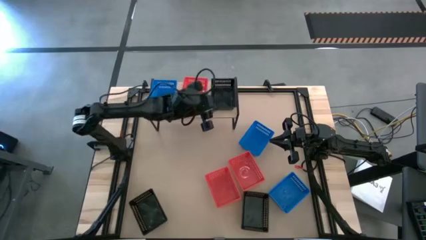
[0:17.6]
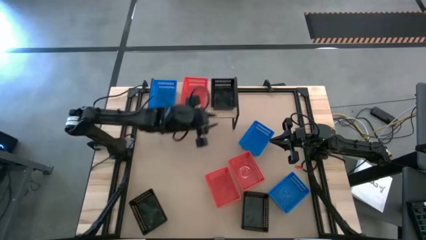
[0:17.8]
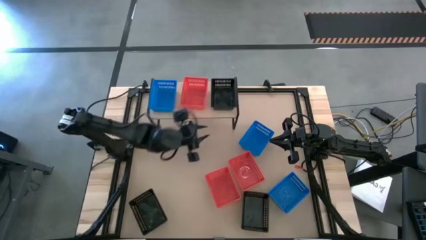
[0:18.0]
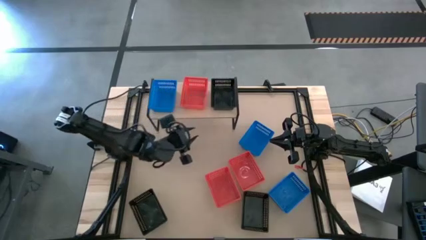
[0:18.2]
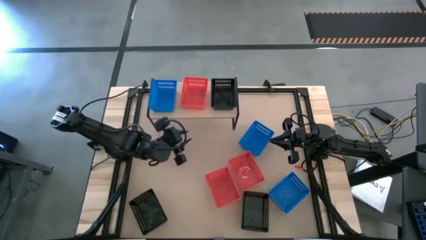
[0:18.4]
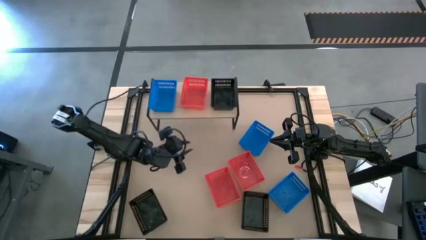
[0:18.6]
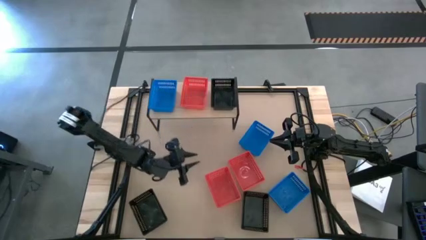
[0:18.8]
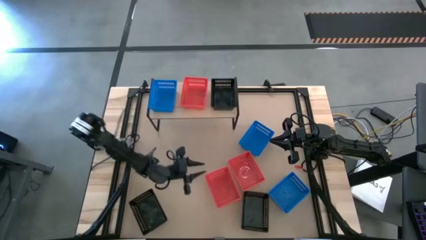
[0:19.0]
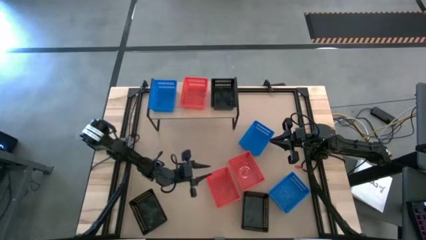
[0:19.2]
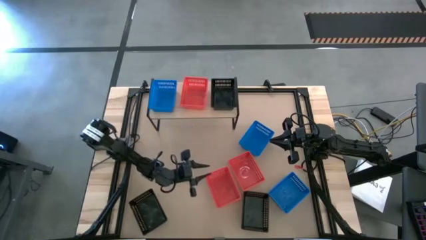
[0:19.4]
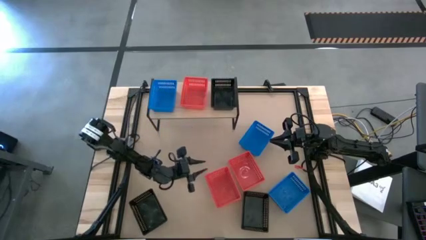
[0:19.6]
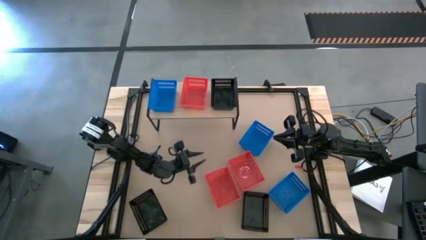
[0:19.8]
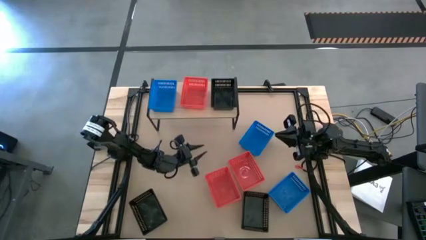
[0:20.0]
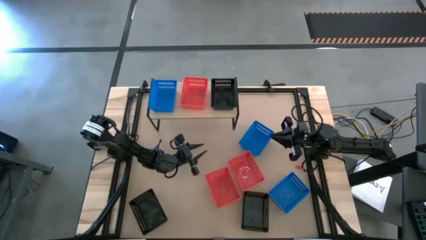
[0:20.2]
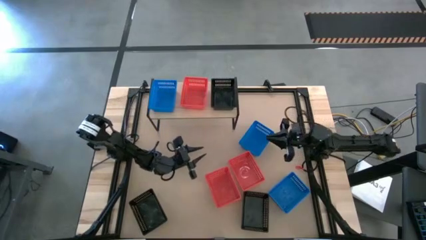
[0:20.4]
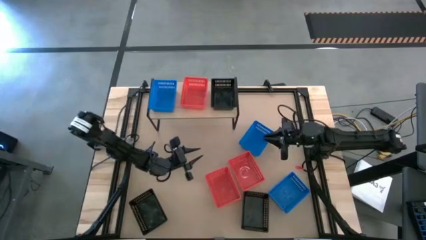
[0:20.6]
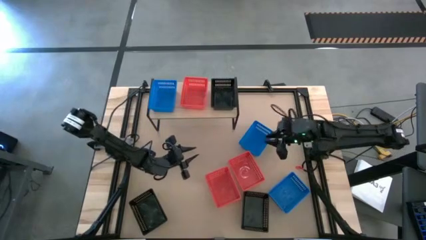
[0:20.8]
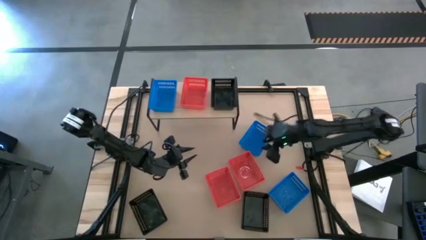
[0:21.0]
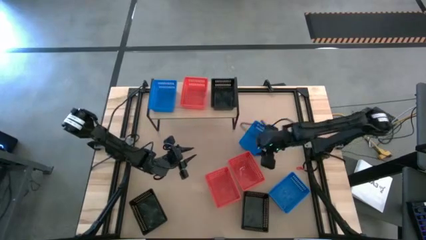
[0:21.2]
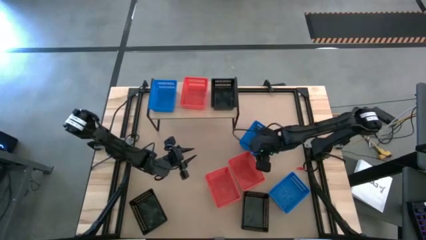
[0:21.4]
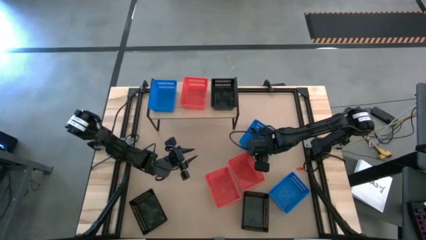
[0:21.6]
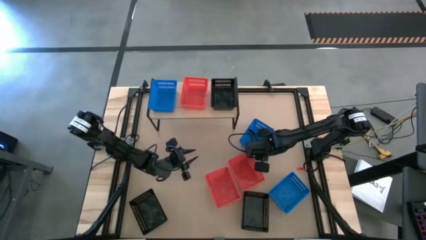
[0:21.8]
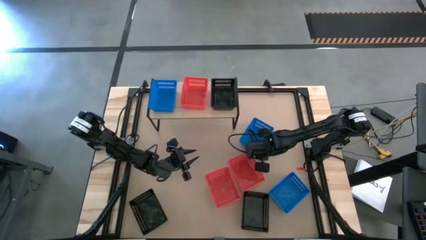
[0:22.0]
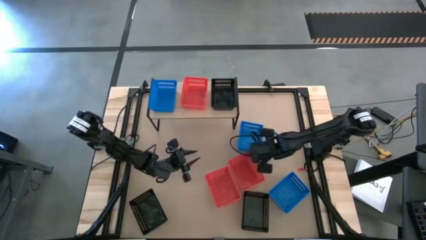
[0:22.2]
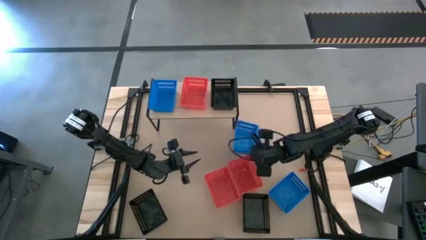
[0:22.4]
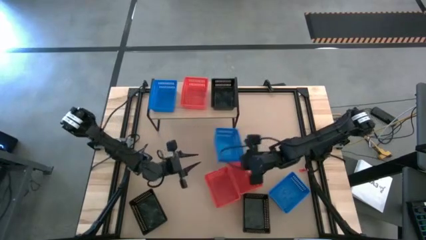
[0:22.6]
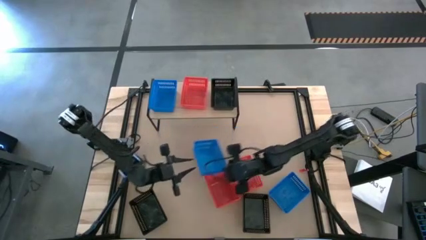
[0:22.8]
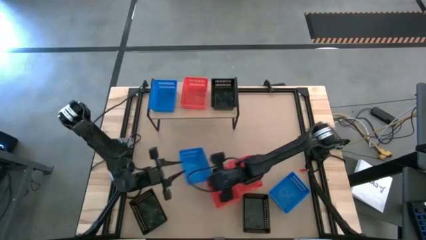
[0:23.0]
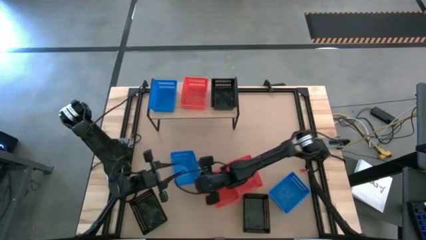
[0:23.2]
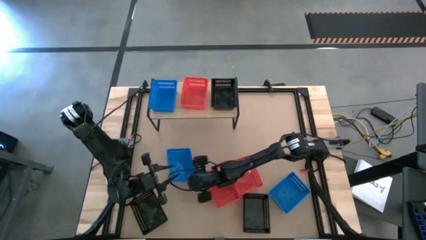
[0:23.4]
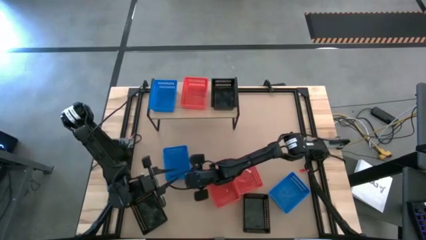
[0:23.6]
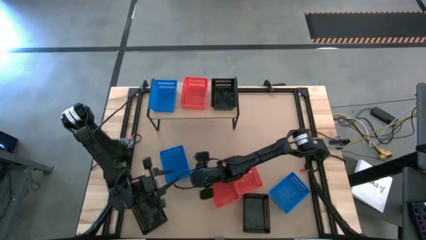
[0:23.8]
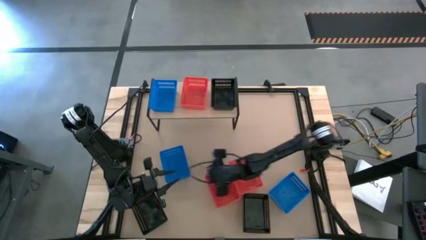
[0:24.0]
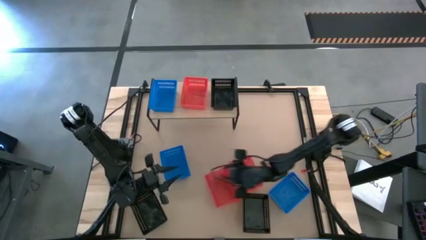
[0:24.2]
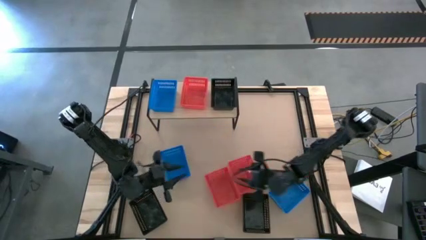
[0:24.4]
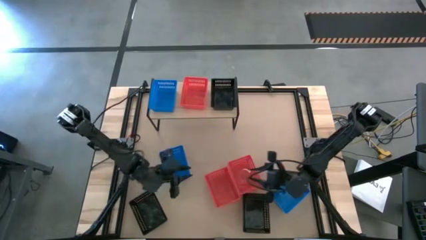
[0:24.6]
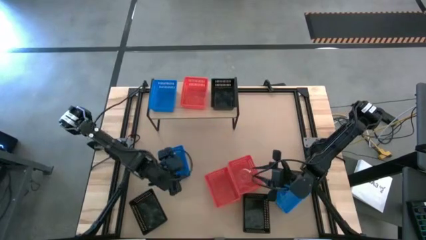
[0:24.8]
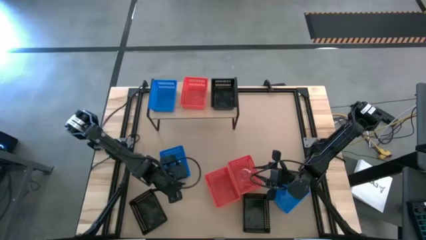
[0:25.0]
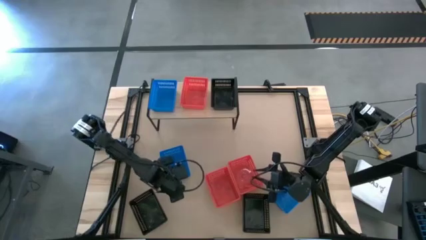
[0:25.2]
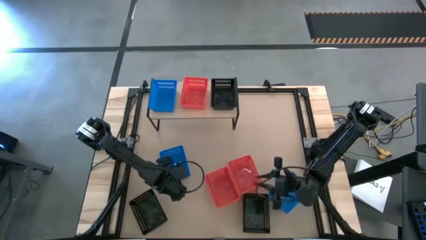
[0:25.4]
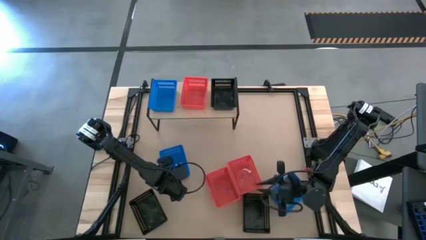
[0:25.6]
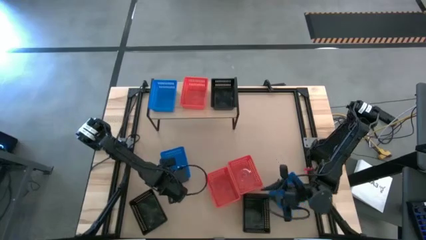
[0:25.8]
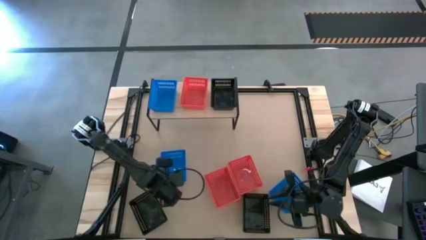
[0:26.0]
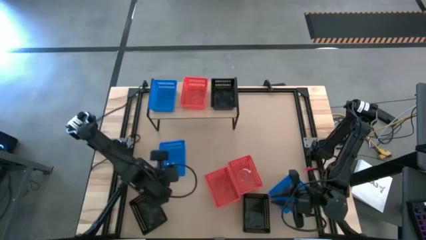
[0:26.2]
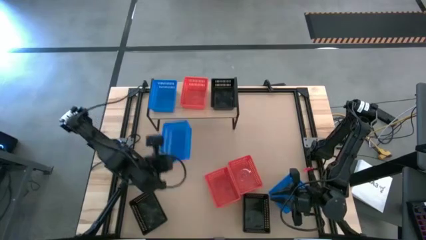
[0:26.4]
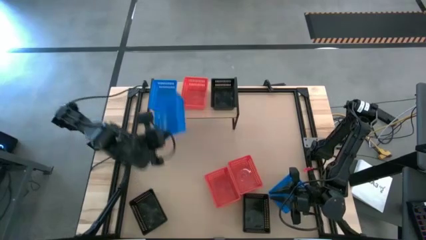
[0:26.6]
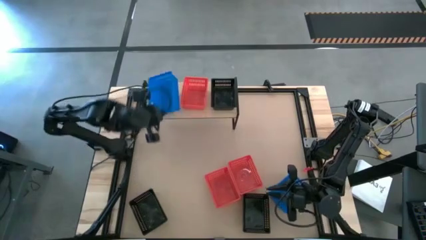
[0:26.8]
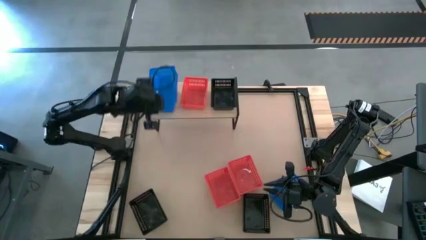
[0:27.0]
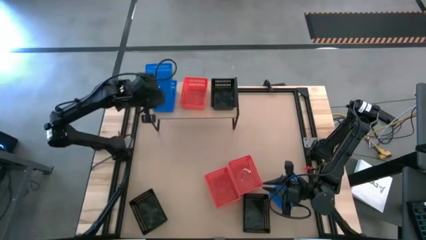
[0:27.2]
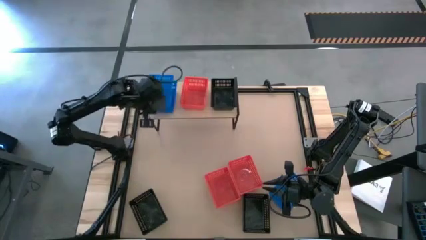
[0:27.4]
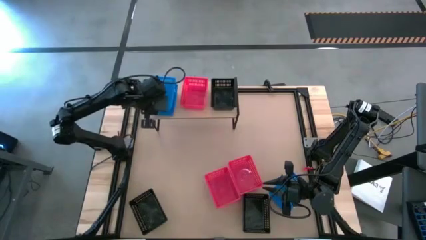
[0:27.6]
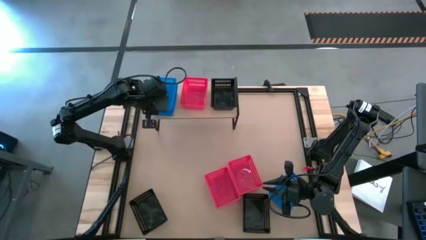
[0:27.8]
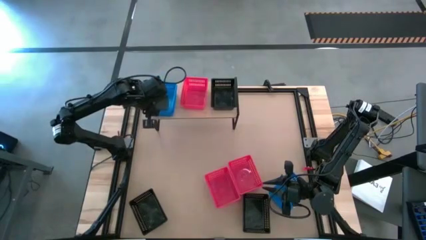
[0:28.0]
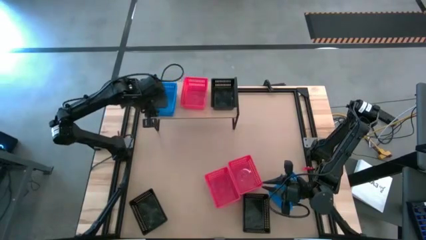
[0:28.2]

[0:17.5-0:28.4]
Task: Stack baskets on shelf by color
Stack the top blue bin on the blue bin on the shelf

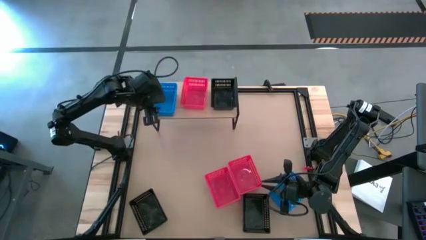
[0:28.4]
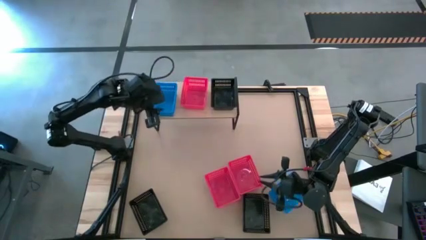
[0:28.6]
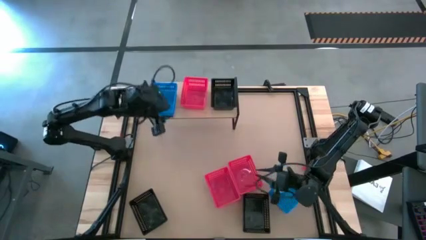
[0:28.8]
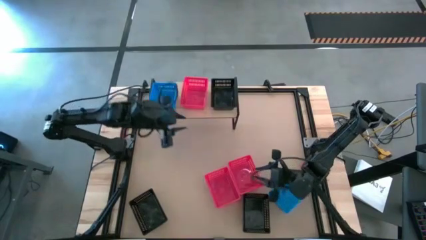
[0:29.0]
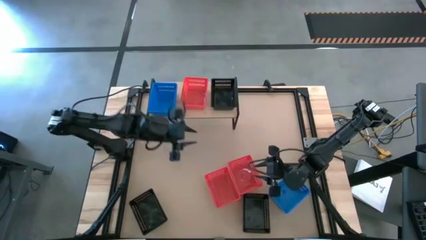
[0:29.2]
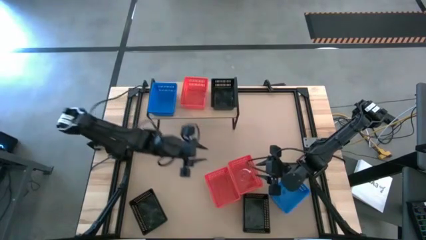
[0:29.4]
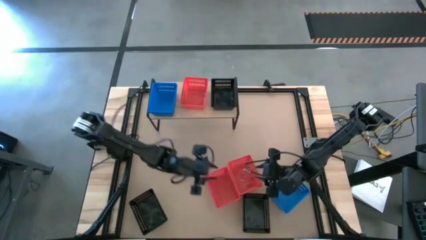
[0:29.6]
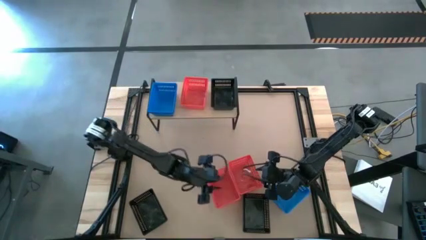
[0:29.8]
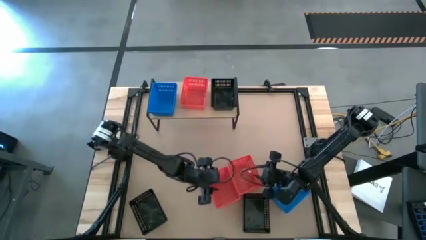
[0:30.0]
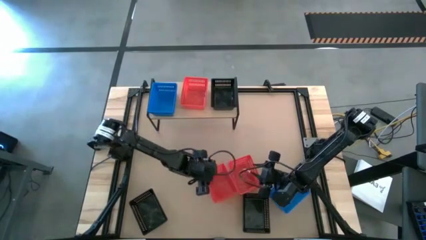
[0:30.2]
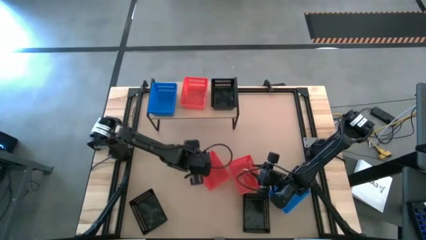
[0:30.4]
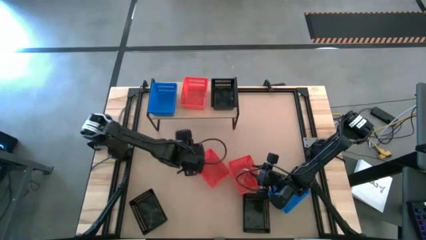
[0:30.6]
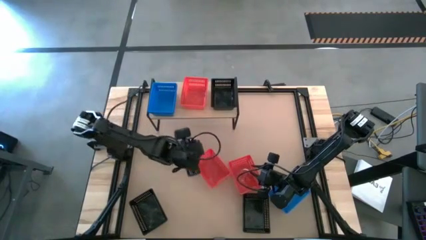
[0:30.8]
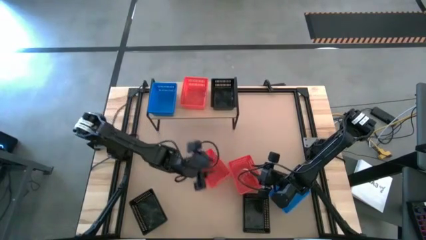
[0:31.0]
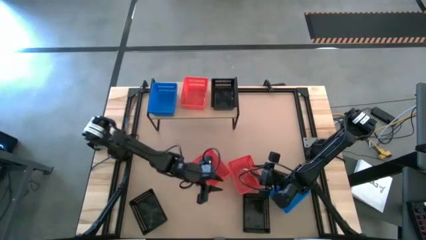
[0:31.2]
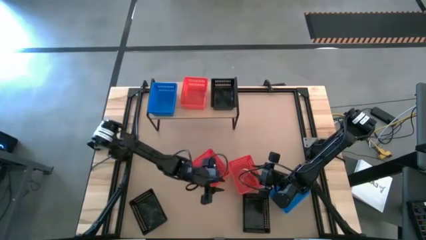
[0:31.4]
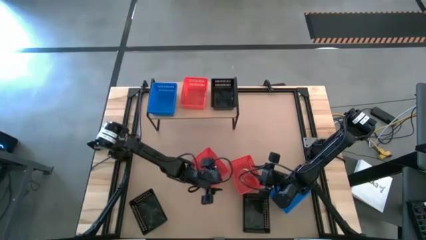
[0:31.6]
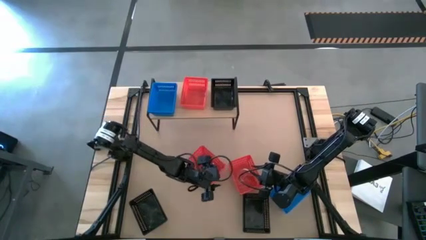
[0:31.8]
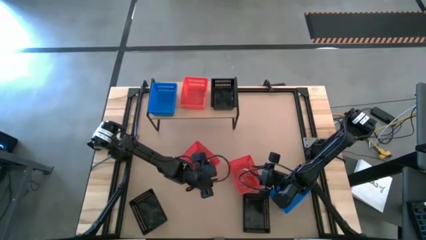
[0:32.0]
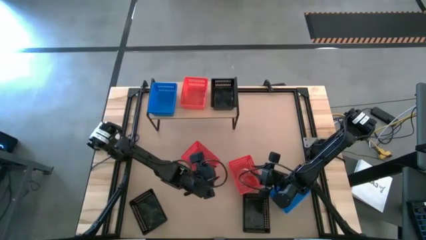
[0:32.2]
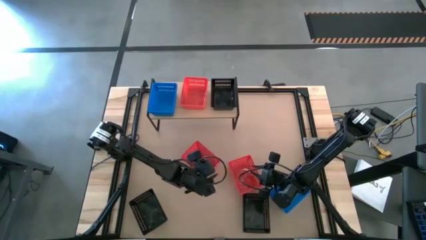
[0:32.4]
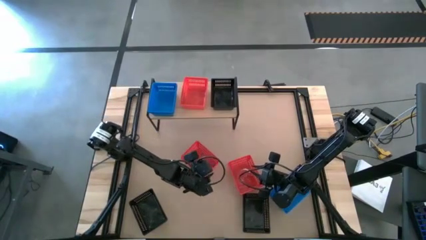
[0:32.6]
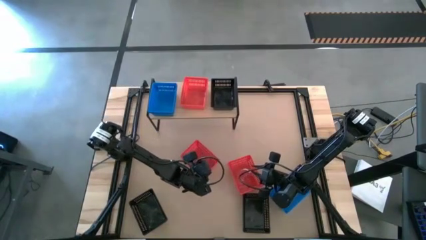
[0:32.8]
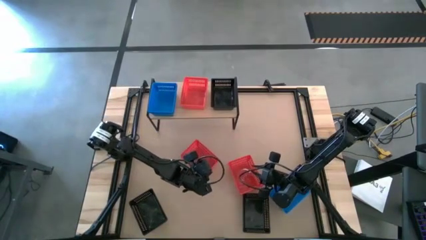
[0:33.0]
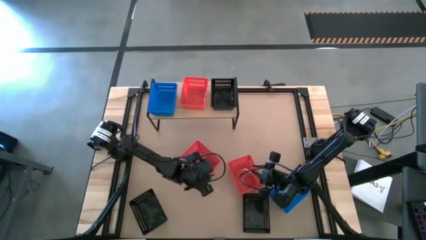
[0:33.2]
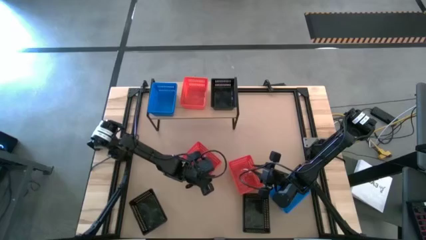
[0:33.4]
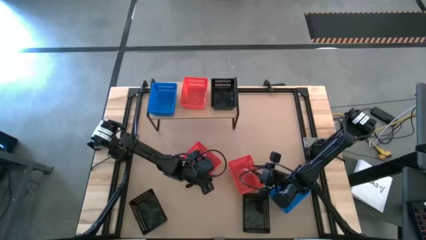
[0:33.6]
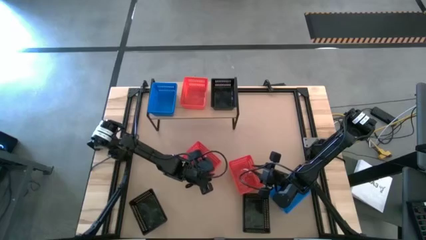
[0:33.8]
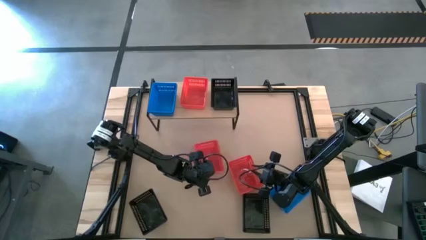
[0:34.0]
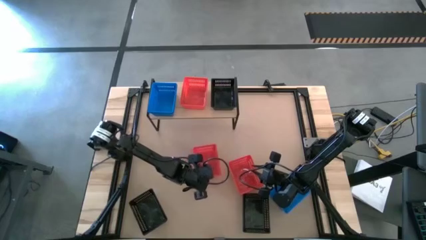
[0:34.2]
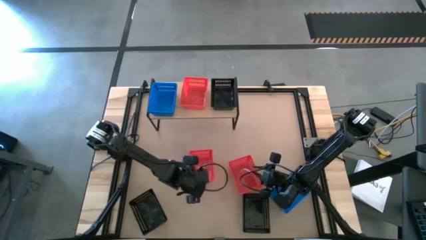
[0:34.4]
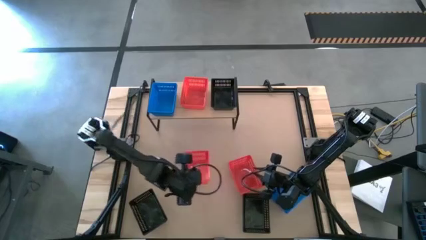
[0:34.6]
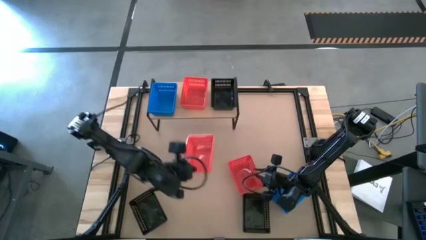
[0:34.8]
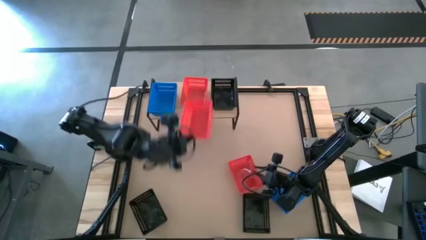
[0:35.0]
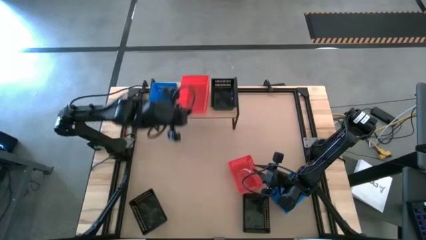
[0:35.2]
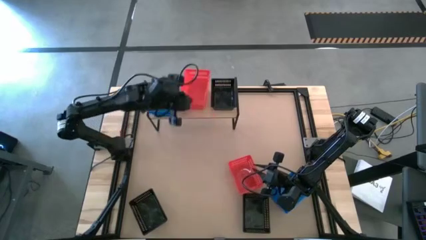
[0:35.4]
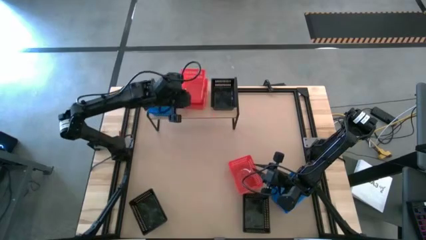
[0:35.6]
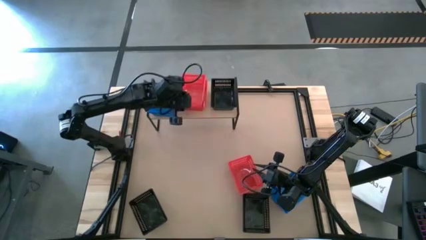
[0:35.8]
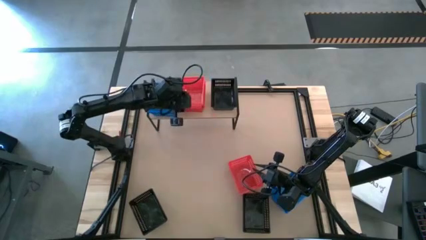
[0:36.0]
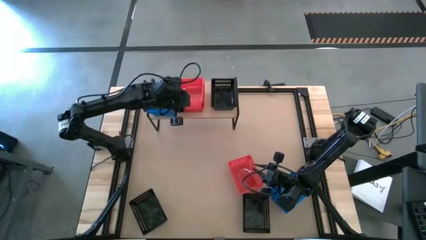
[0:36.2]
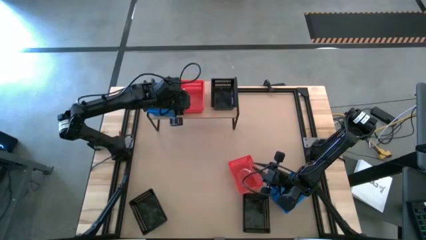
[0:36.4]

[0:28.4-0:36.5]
Stack the left red bin on the red bin on the shelf
